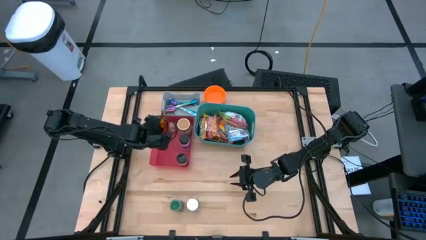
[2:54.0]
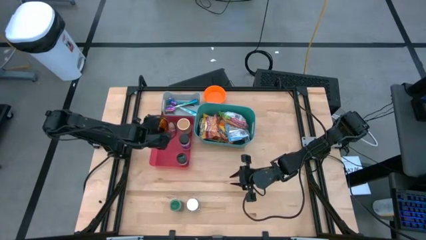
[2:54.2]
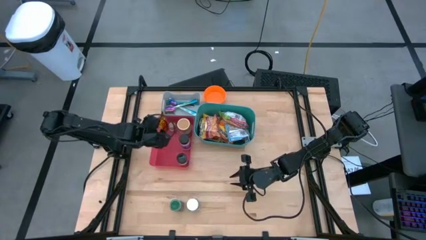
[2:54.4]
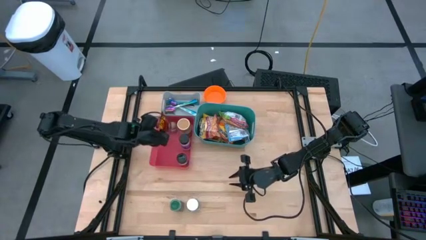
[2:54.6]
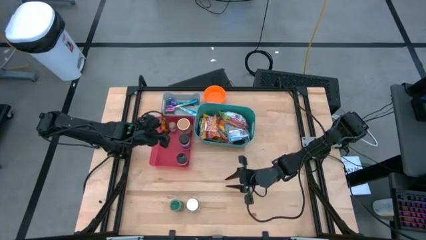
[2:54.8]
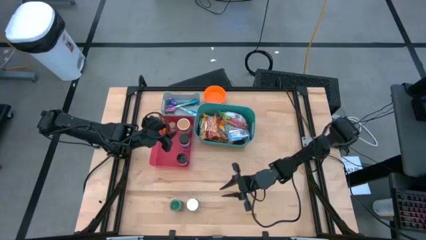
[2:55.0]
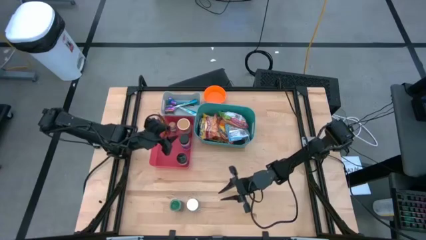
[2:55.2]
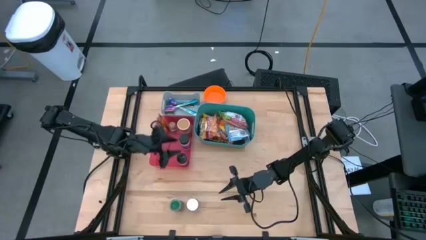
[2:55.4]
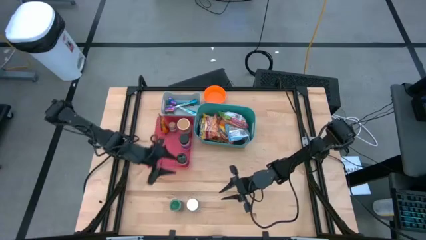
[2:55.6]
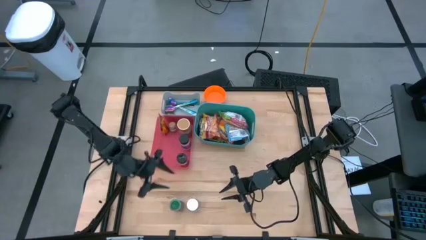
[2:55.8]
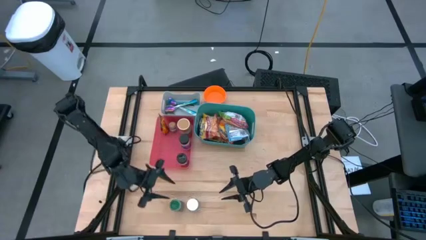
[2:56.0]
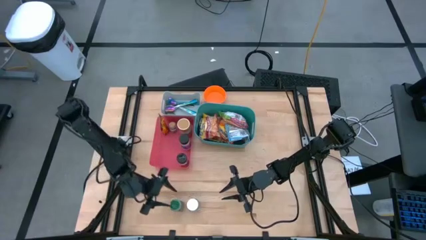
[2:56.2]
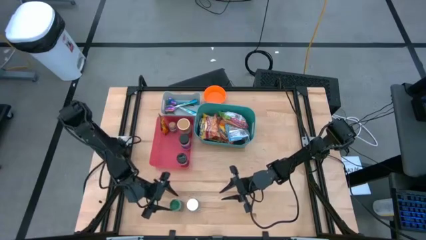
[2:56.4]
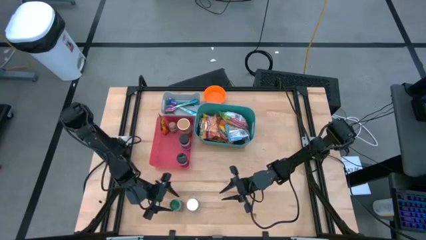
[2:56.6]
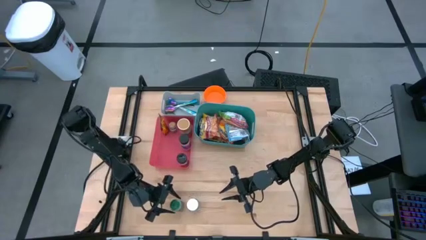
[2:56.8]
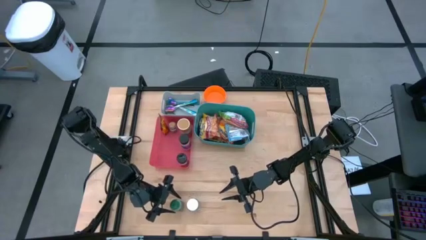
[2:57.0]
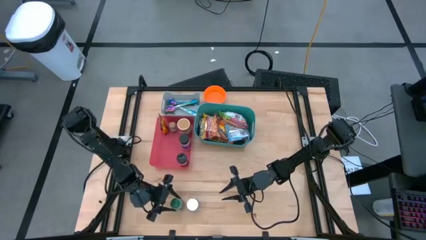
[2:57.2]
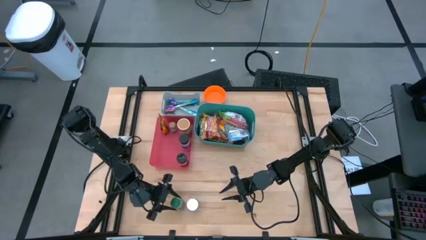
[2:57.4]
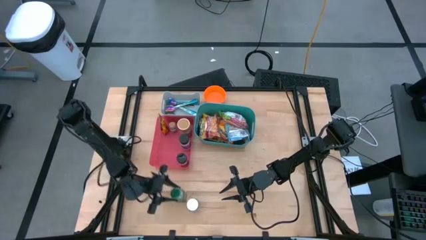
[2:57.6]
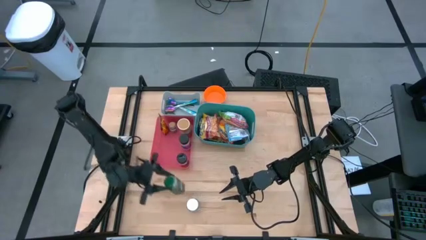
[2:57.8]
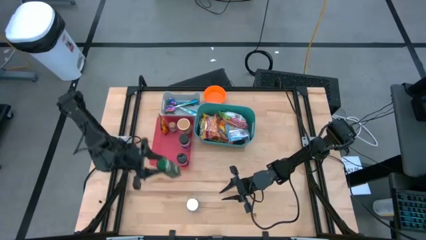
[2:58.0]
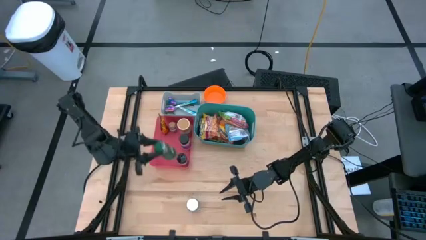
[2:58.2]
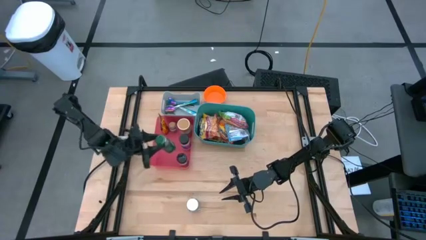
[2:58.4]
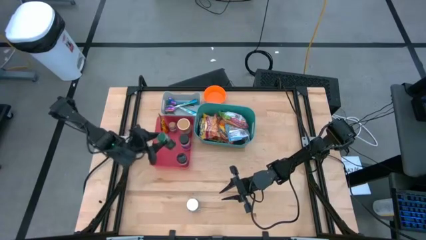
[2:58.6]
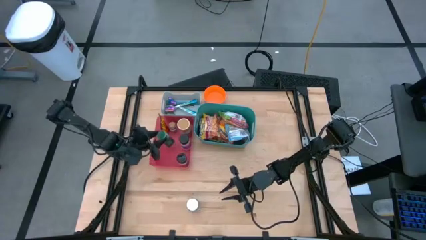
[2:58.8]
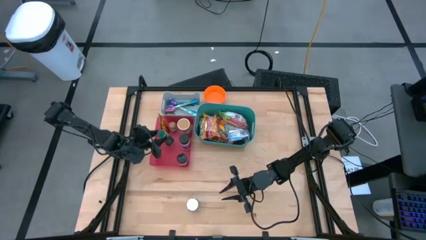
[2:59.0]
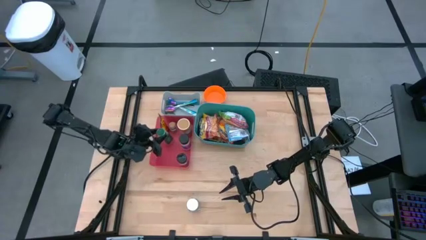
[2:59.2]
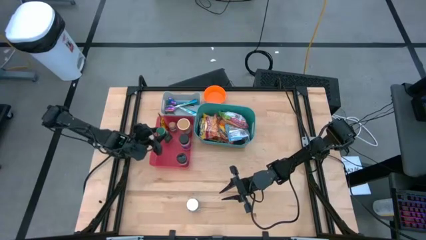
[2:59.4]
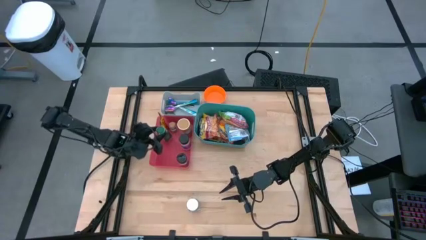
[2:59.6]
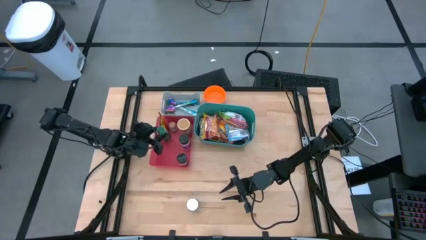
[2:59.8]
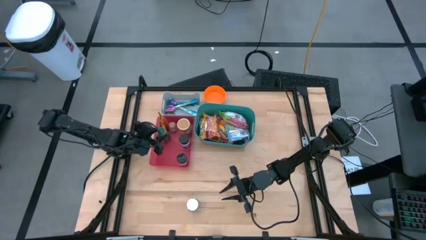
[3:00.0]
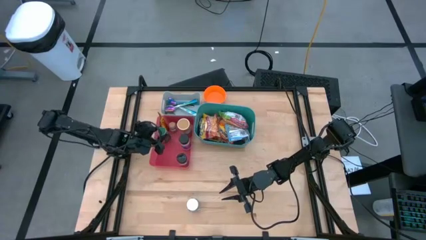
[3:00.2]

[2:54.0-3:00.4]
Task: Pick & Place Food Item
Put the green spice bottle into the red bin

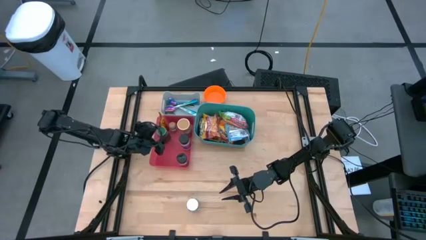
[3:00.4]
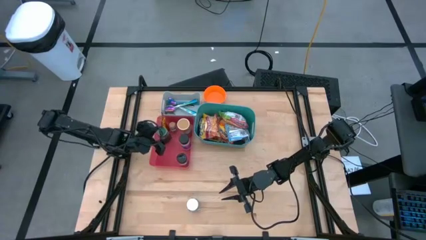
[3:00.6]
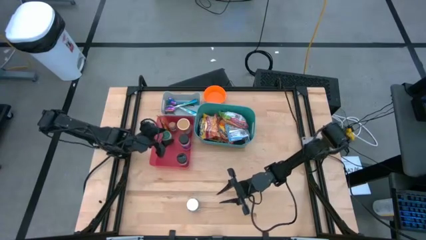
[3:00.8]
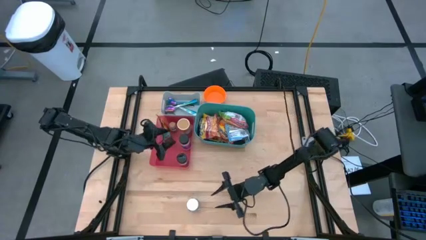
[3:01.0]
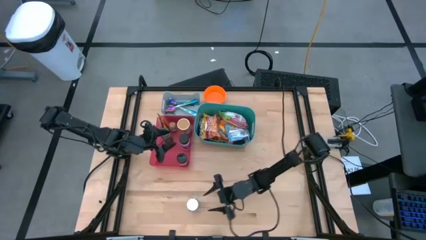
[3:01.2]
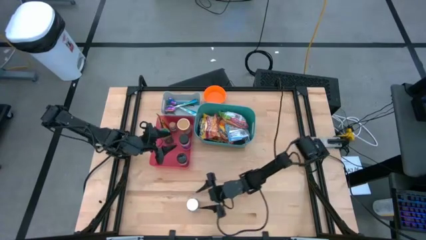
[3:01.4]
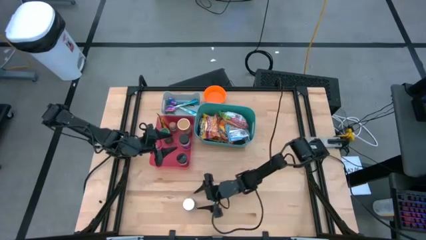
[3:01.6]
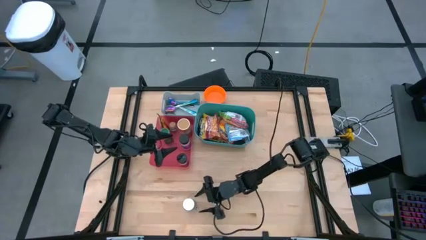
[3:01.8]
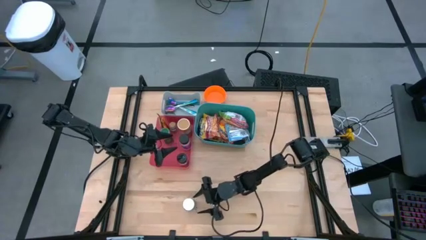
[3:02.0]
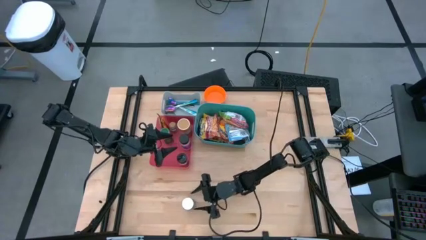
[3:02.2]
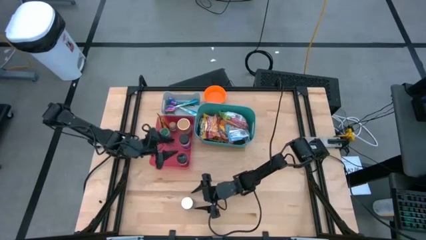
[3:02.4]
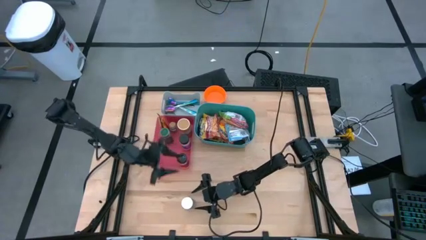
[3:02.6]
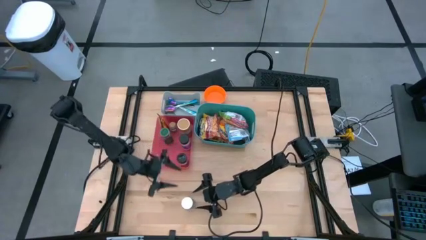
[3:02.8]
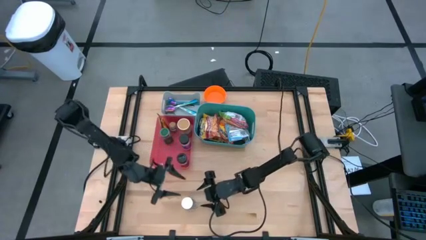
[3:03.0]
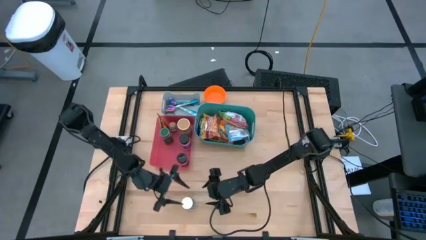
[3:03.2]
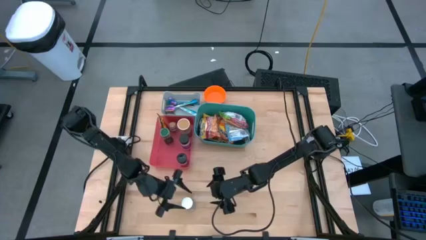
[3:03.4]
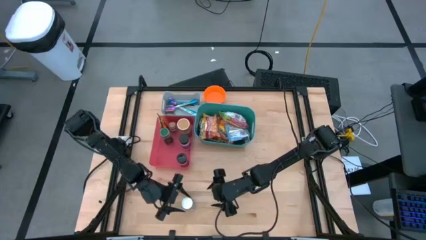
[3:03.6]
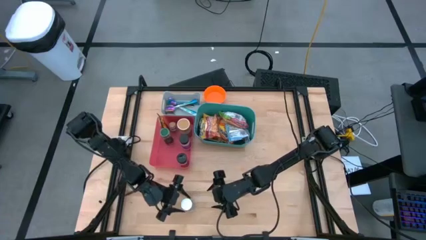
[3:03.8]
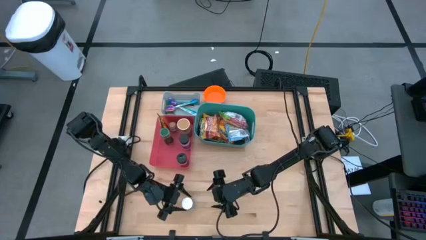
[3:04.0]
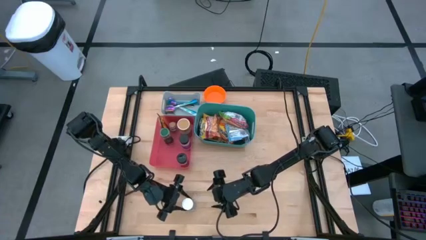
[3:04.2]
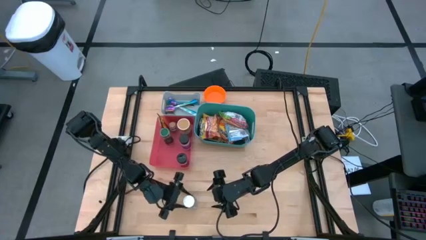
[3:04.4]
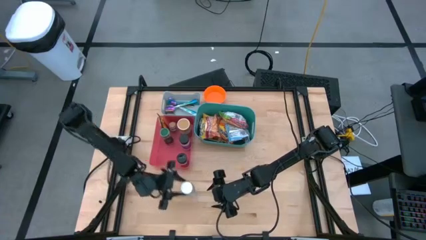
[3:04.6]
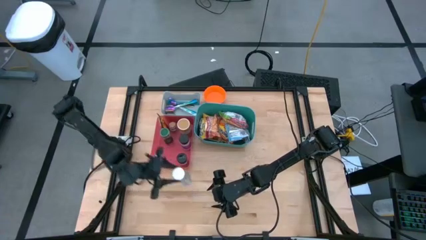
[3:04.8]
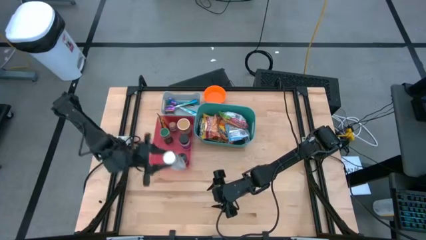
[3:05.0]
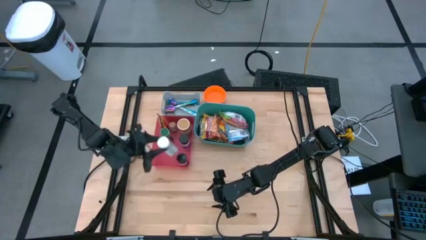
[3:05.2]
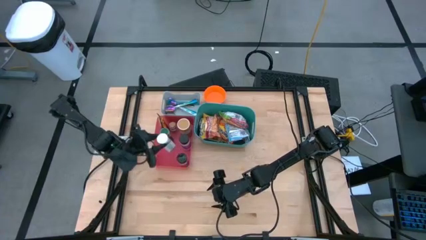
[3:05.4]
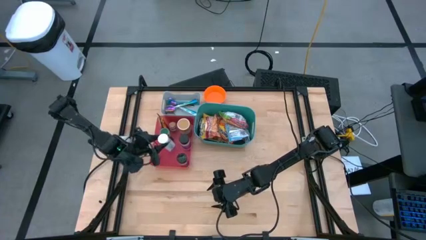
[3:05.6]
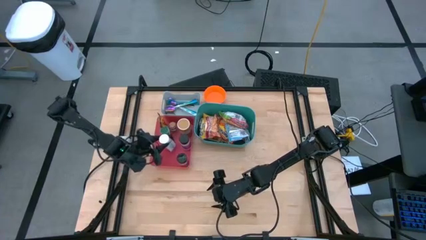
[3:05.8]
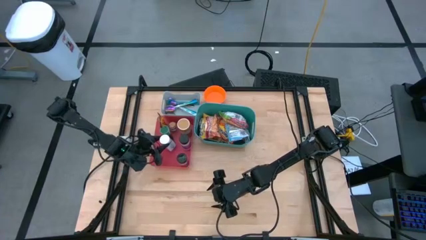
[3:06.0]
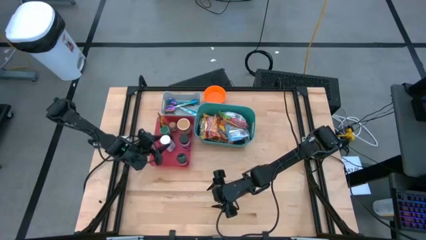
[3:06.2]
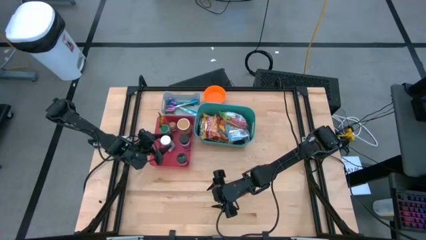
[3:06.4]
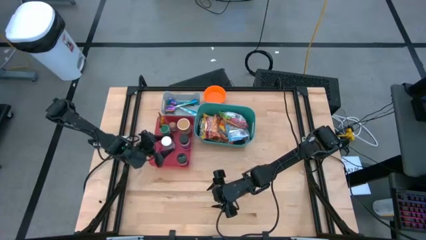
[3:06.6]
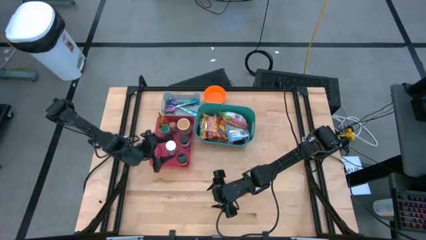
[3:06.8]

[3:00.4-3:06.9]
Put the white spice bottle into the red bin

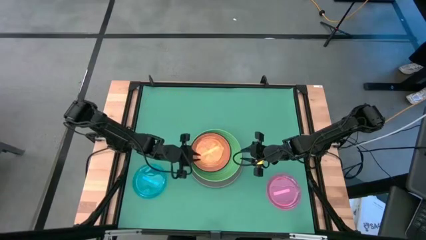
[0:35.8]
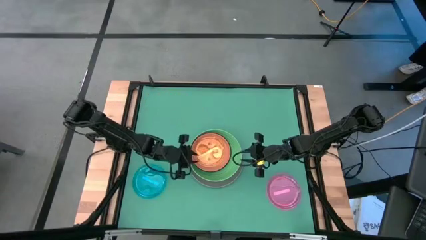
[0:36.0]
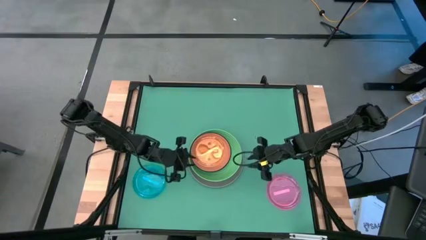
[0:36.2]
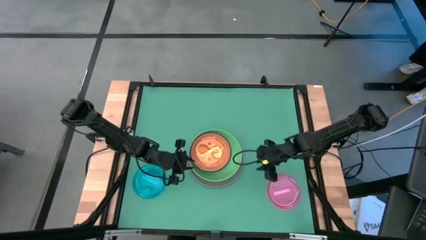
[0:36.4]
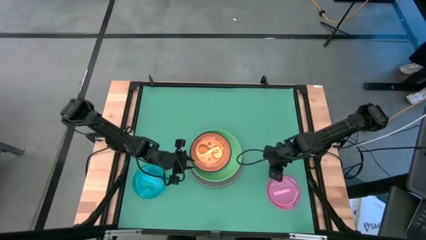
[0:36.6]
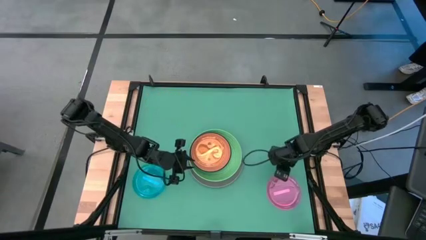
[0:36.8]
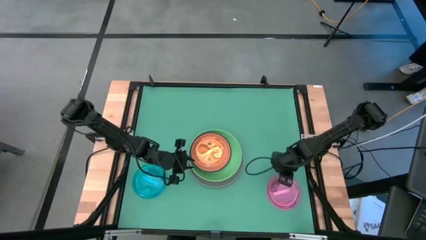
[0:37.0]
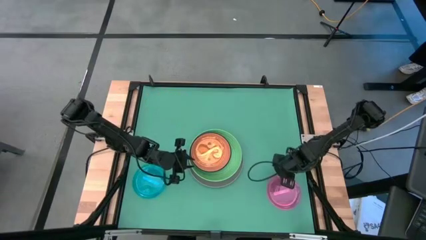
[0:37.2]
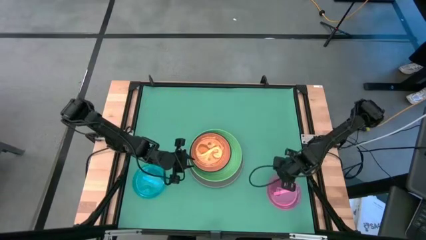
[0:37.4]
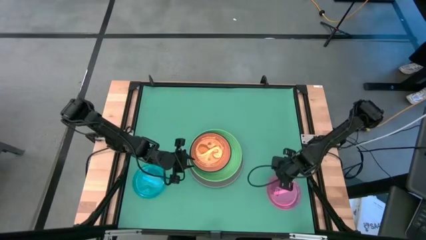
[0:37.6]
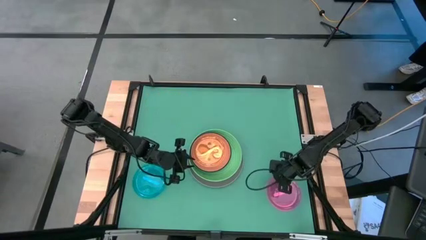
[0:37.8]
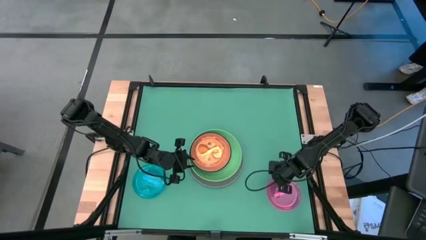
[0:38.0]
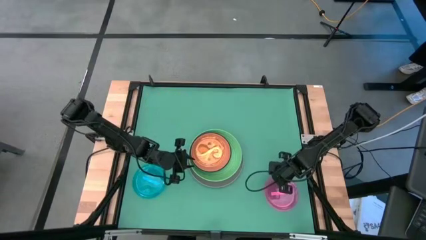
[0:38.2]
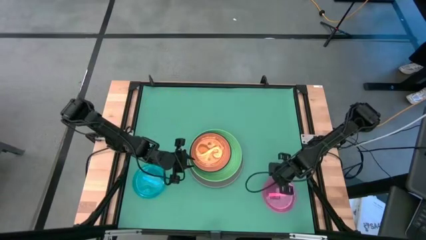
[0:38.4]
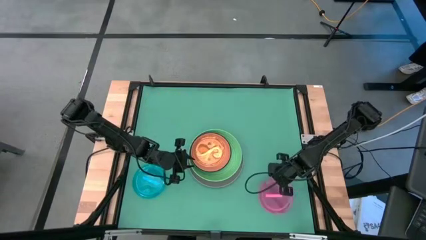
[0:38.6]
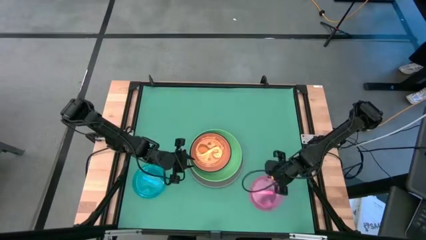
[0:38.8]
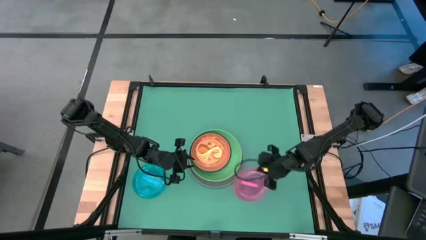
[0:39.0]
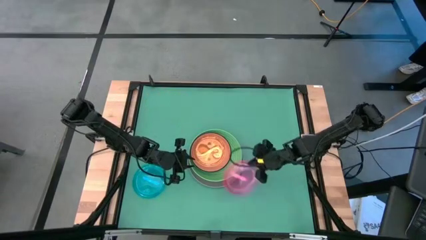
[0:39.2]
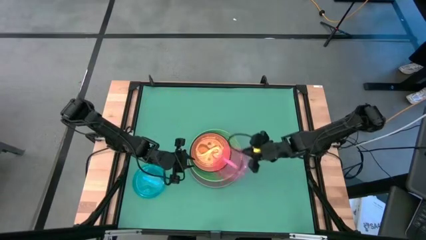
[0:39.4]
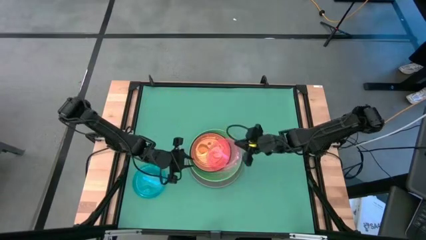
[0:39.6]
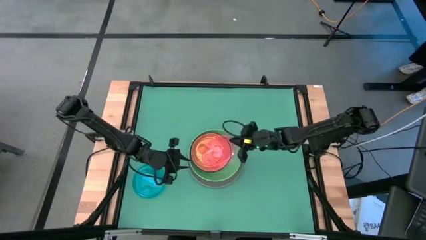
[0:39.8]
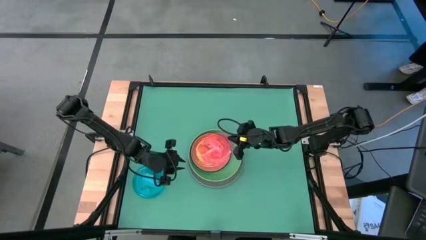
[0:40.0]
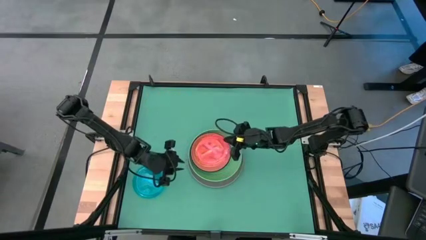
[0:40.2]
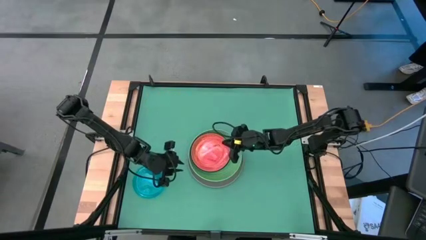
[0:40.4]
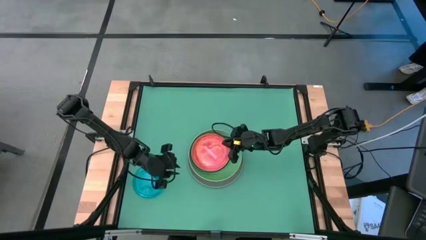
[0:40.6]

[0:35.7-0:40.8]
Task: Stack plastic plates
Stack the pink plate on the light orange plate
